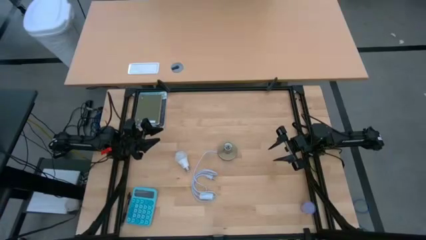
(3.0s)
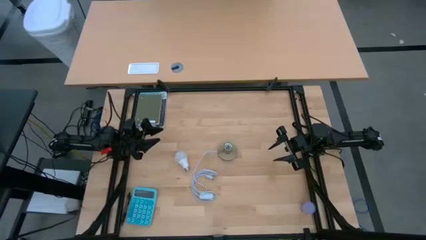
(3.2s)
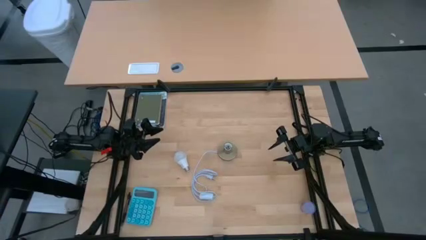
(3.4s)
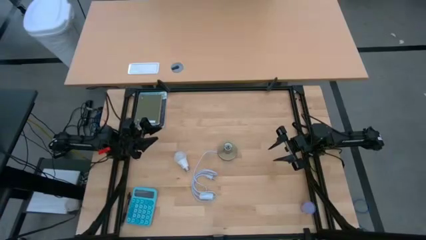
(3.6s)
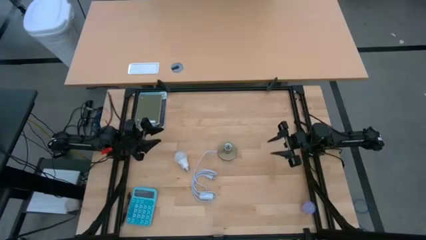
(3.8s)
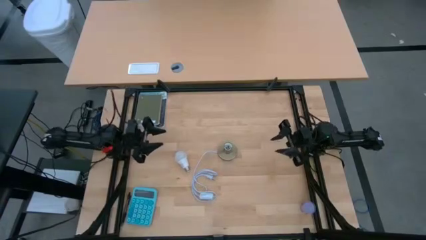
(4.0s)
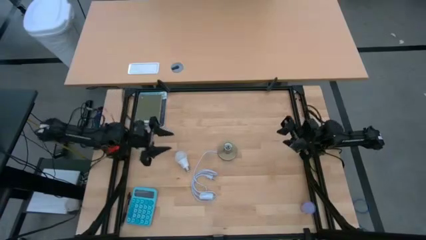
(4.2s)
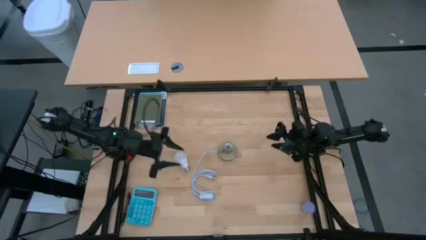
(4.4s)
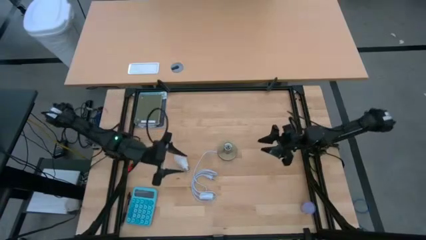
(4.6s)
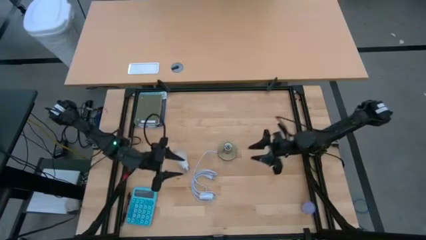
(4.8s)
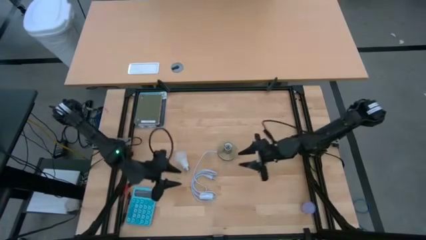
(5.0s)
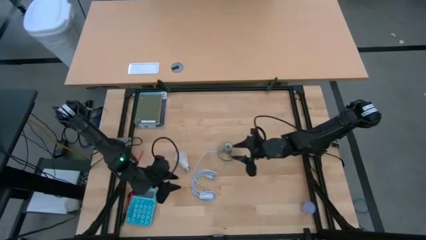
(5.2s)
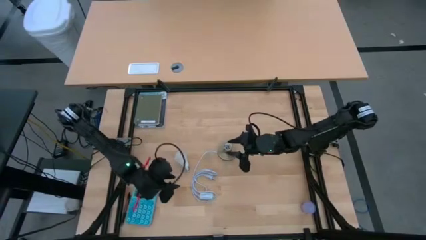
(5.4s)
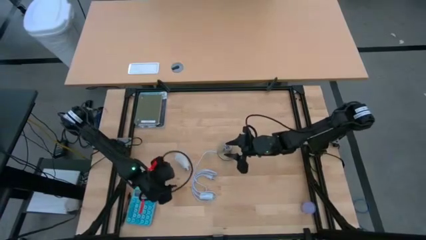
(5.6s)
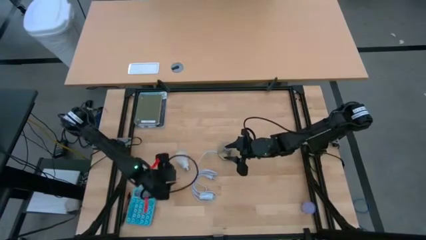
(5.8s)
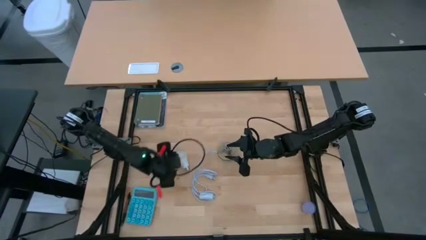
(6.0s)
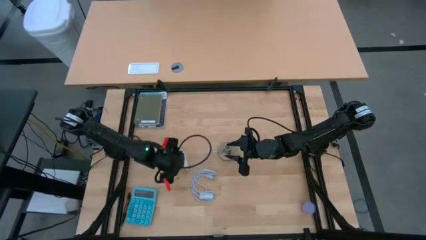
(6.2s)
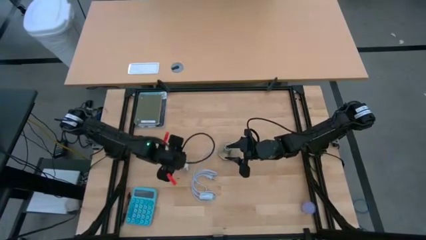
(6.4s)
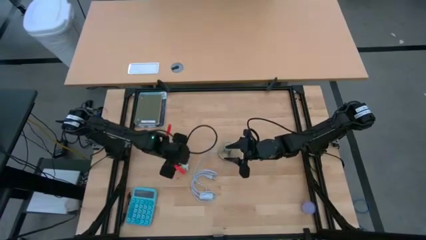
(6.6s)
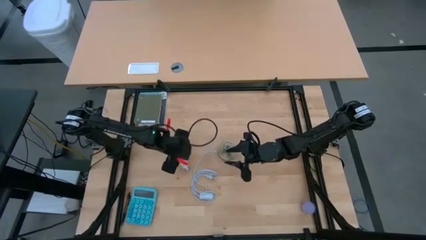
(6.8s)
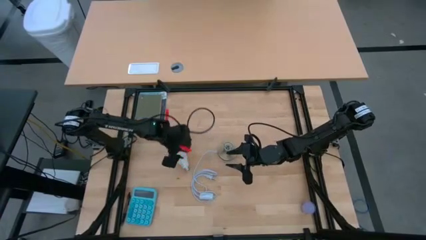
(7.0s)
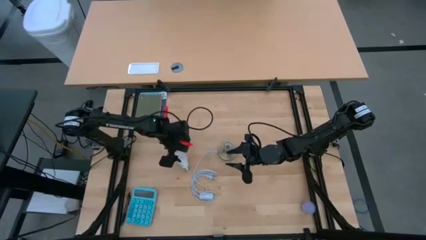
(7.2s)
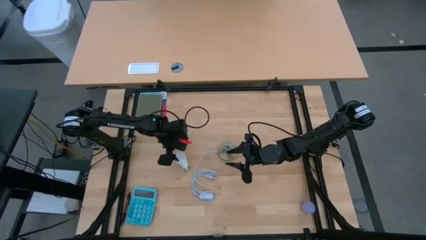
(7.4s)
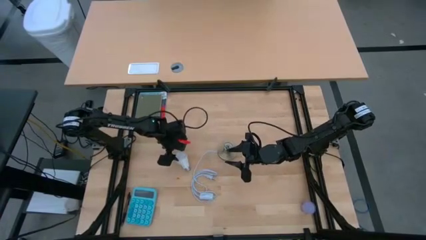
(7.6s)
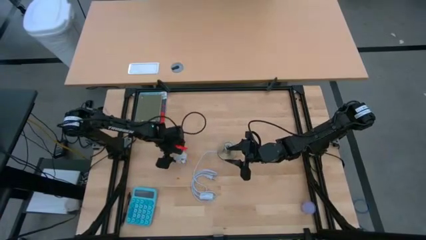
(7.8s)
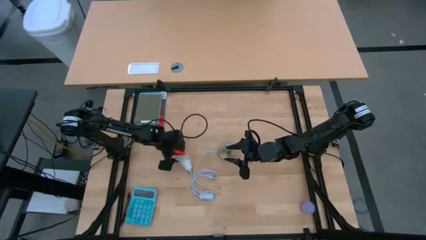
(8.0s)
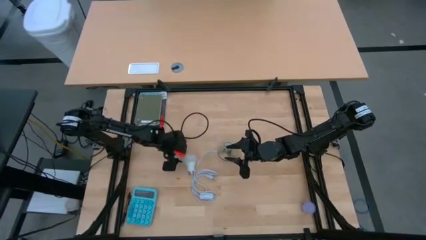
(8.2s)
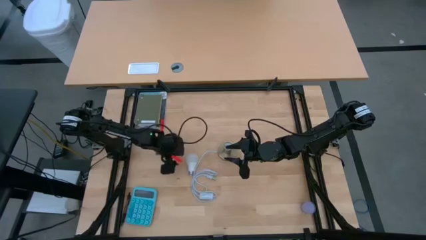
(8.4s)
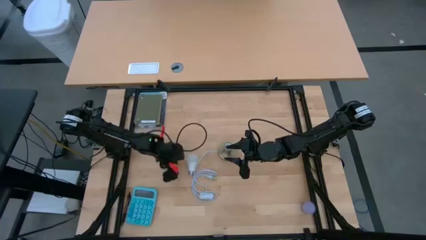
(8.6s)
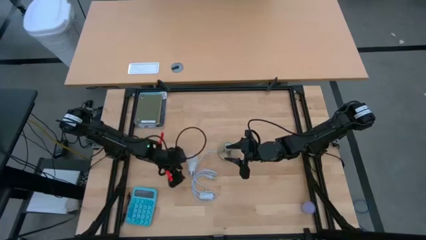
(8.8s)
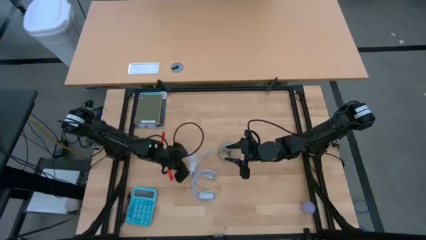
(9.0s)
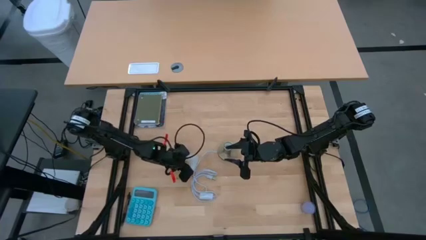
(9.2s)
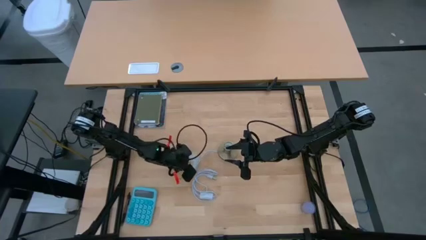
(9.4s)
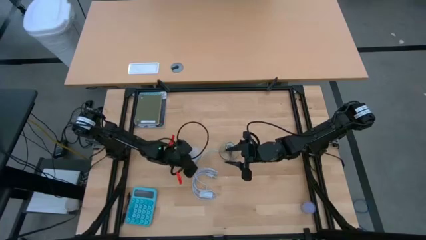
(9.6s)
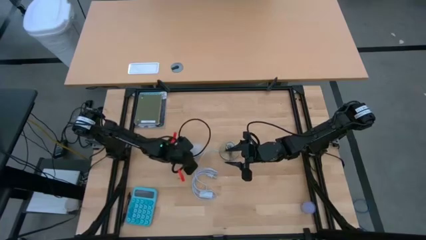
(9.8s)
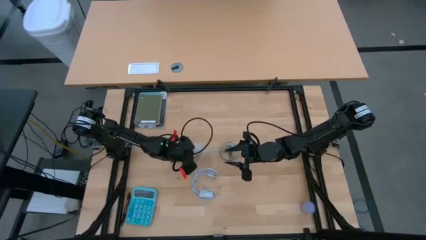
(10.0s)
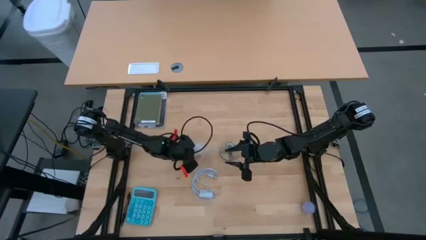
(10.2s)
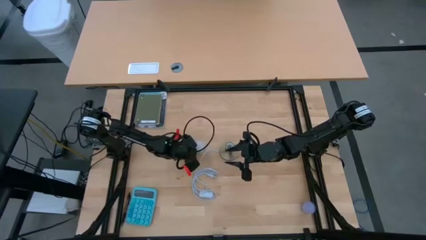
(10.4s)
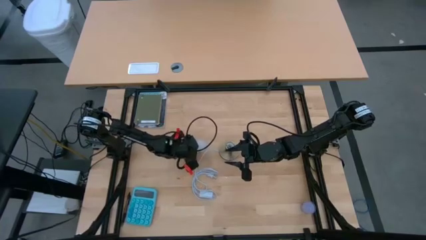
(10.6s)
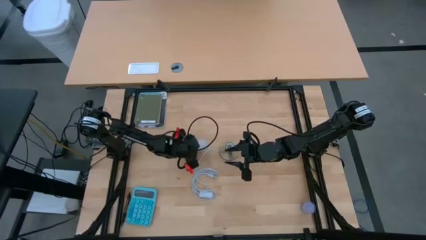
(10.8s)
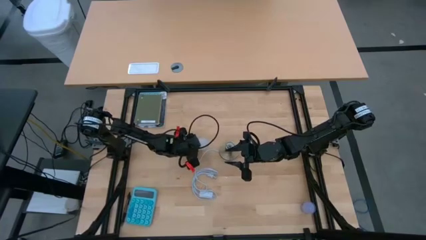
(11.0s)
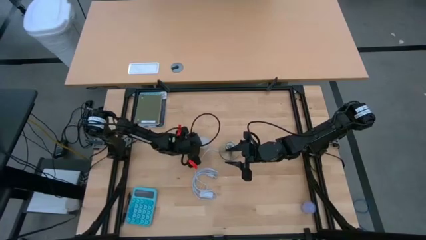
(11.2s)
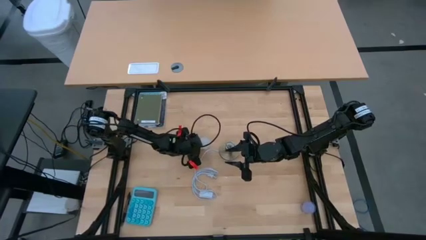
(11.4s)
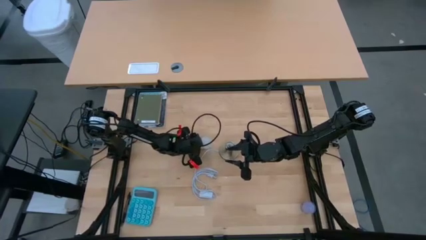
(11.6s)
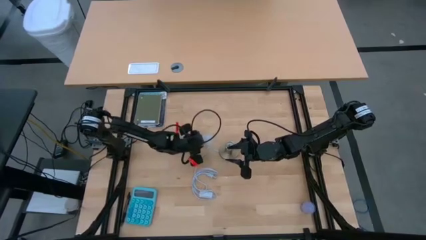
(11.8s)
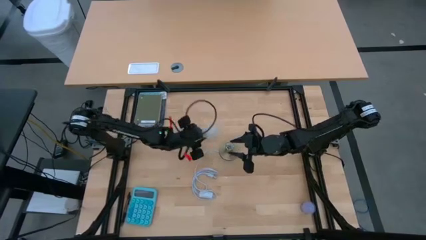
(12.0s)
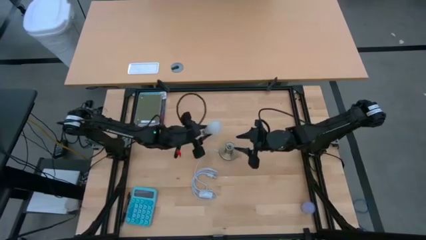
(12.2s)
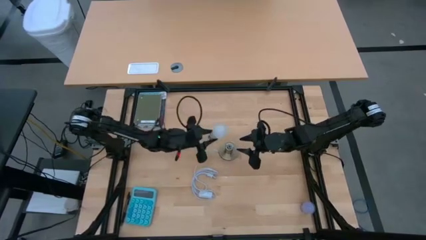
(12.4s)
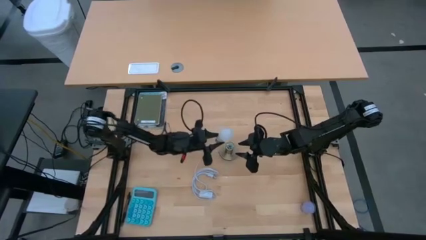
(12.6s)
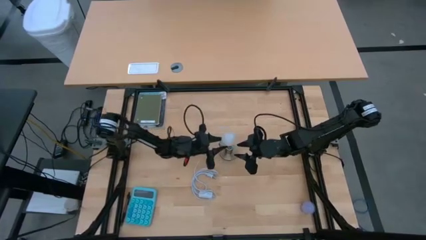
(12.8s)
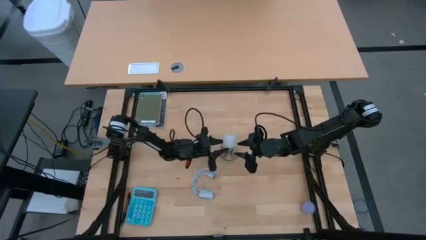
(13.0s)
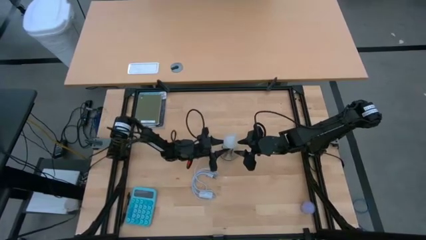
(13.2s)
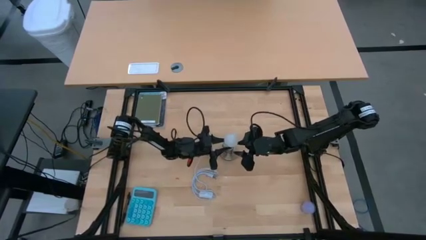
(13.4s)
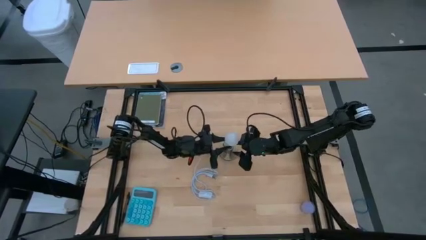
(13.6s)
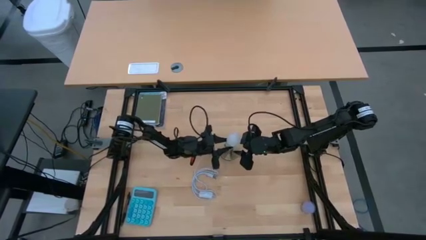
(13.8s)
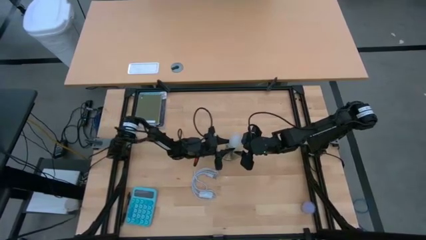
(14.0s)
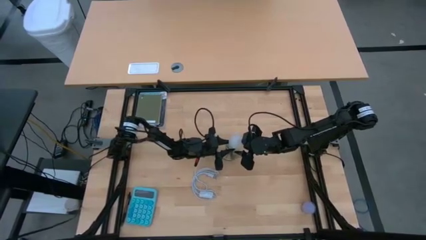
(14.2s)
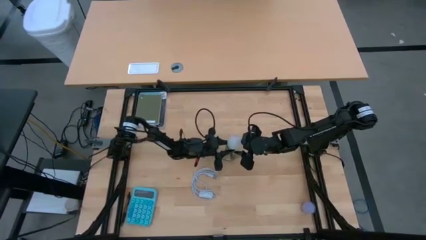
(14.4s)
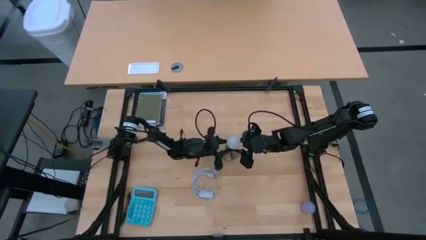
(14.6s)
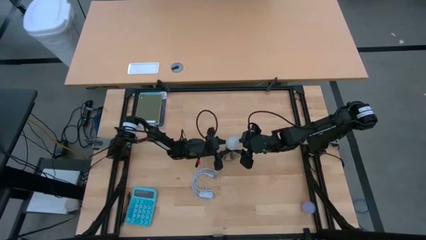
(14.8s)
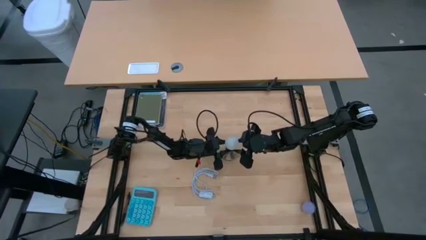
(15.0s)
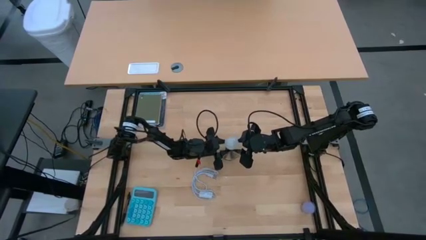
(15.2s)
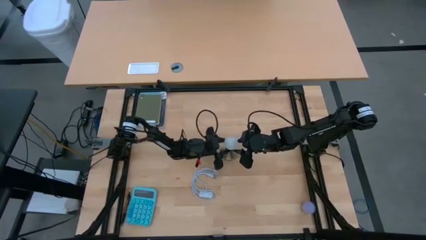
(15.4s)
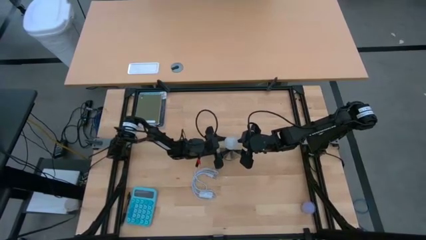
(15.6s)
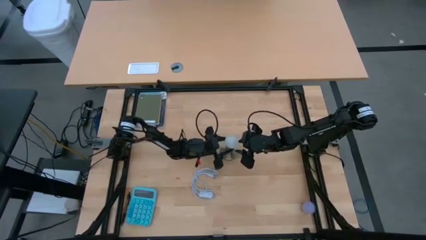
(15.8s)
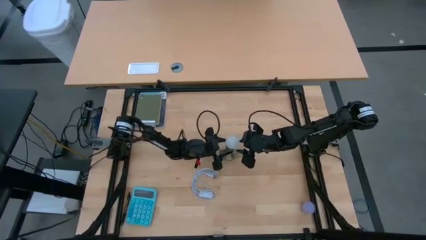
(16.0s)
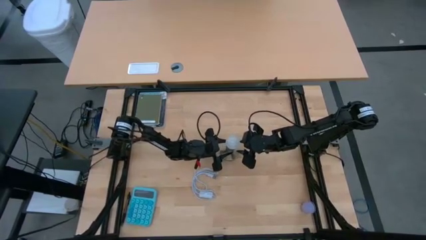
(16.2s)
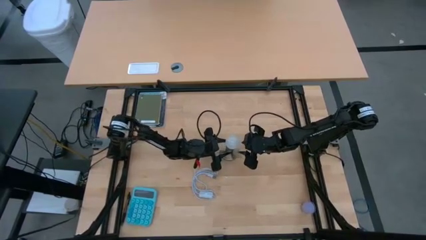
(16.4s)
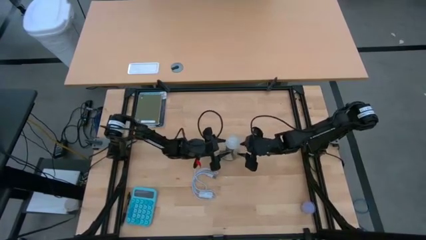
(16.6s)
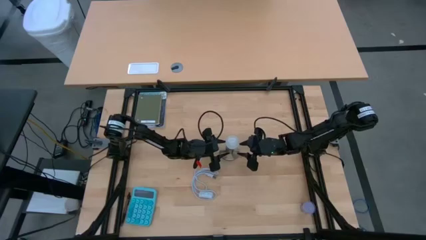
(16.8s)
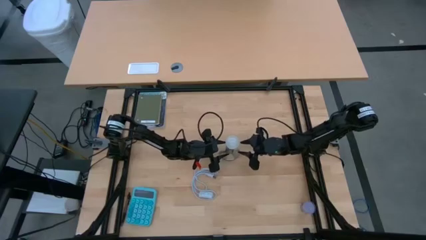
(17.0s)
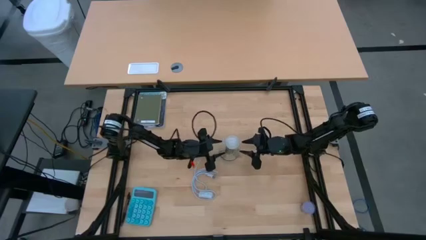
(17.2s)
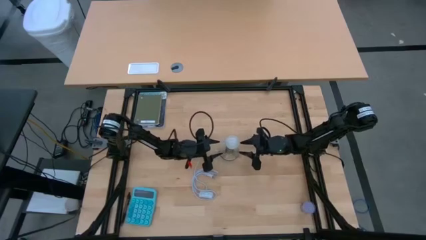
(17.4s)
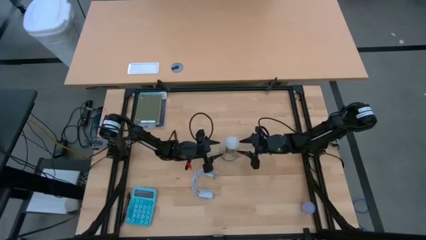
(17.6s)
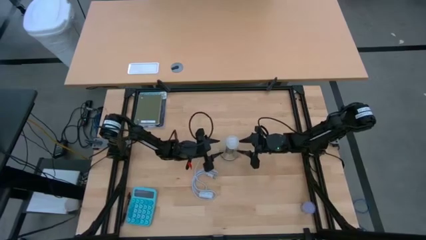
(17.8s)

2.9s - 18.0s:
Task: Screw lightbulb
Insert the lightbulb into the lamp
